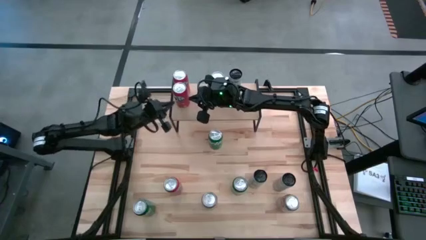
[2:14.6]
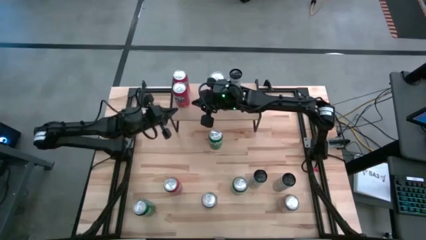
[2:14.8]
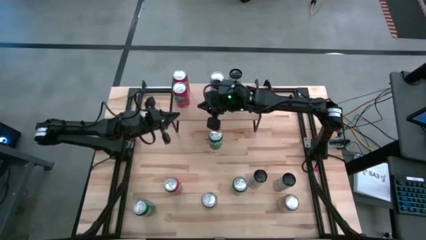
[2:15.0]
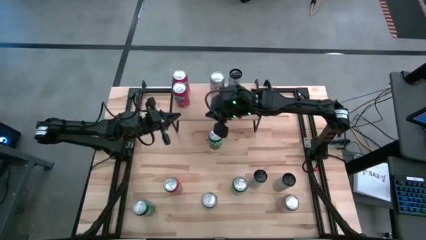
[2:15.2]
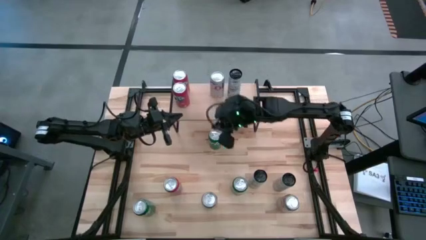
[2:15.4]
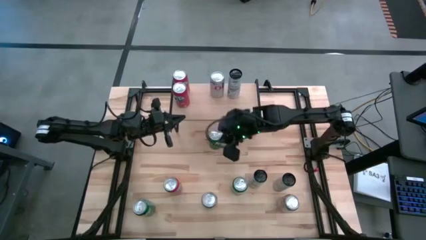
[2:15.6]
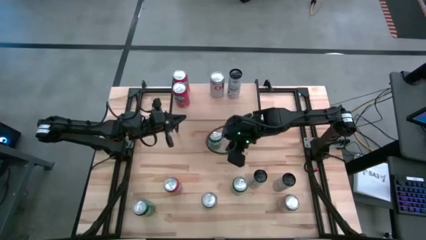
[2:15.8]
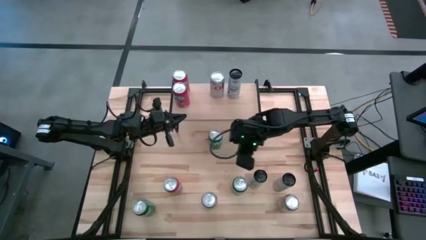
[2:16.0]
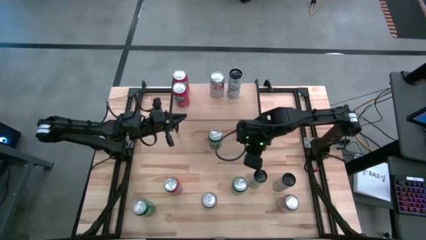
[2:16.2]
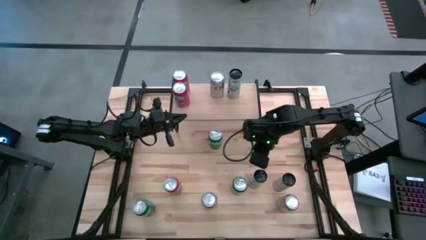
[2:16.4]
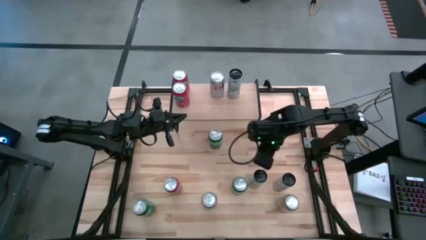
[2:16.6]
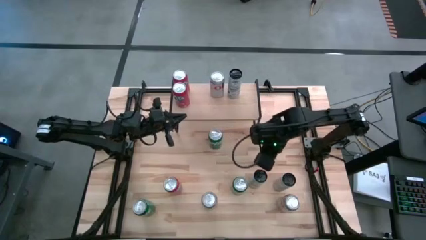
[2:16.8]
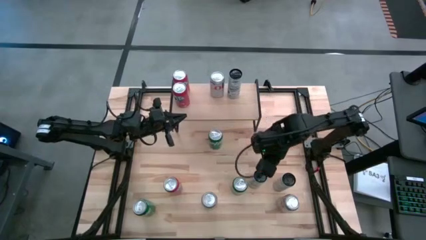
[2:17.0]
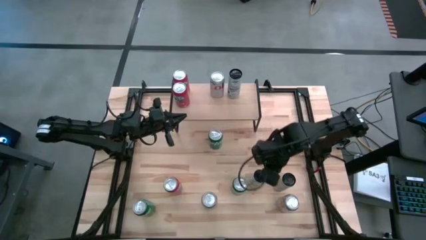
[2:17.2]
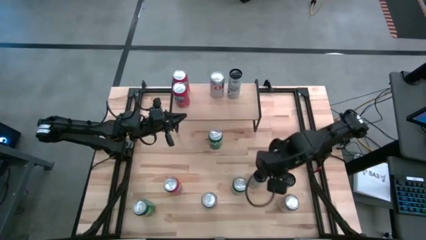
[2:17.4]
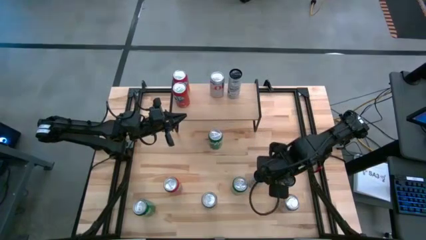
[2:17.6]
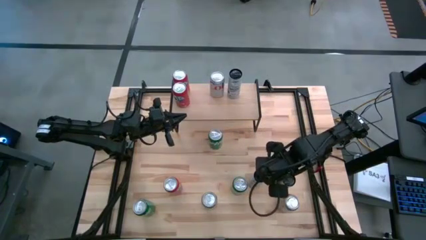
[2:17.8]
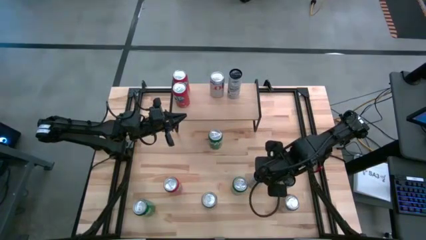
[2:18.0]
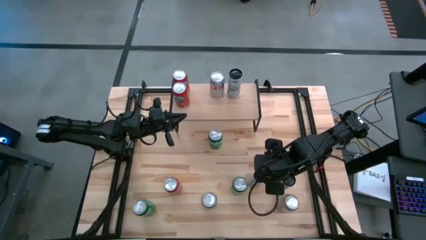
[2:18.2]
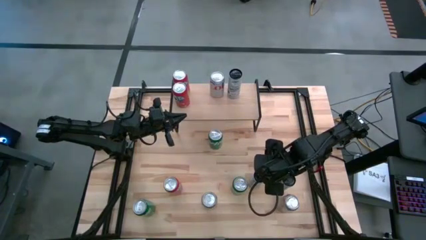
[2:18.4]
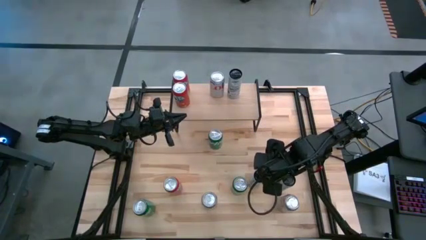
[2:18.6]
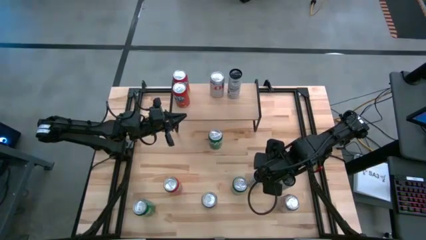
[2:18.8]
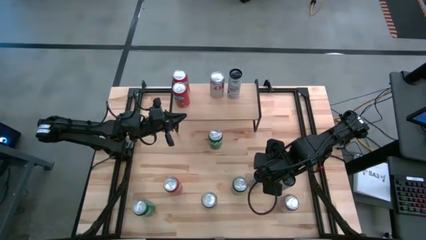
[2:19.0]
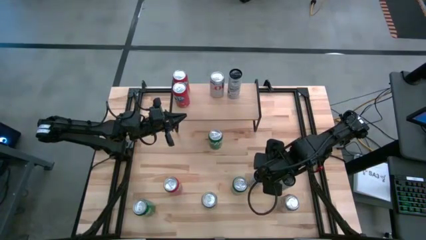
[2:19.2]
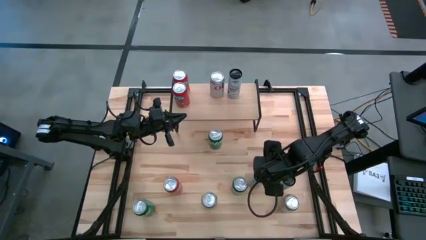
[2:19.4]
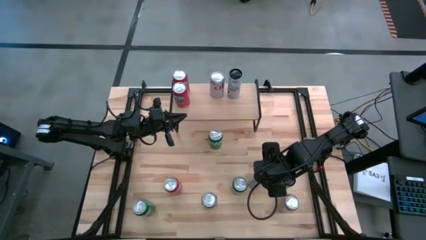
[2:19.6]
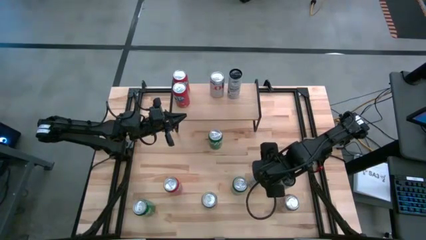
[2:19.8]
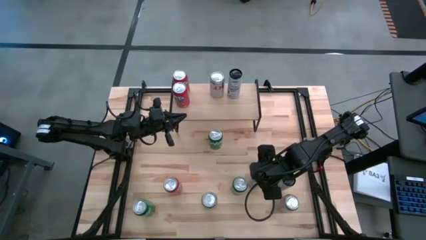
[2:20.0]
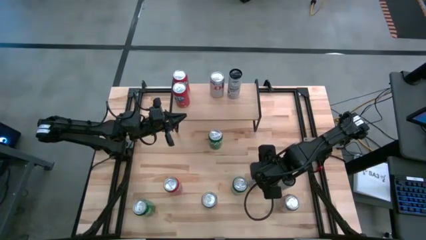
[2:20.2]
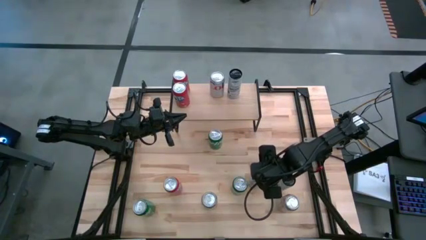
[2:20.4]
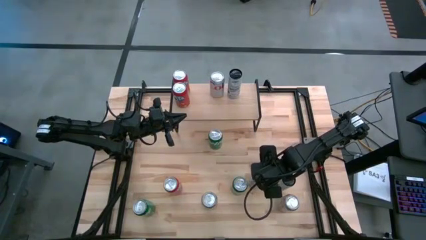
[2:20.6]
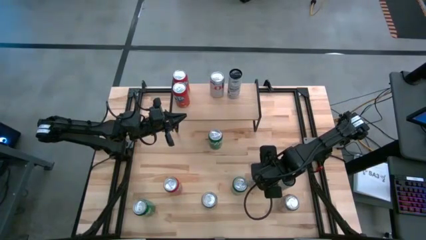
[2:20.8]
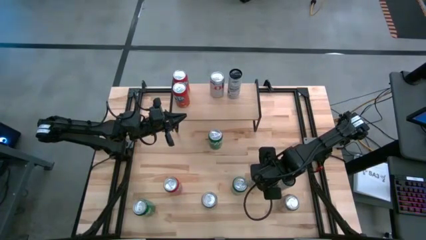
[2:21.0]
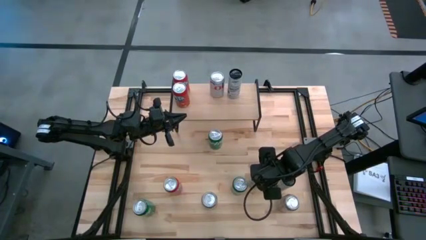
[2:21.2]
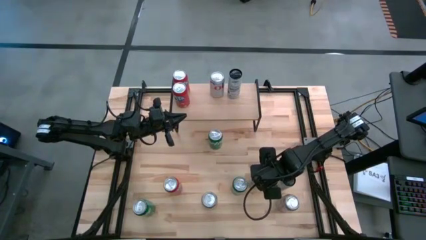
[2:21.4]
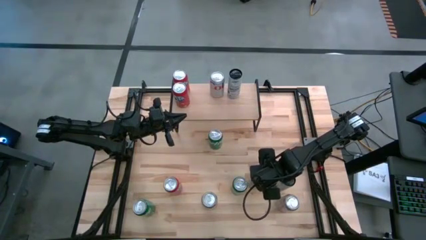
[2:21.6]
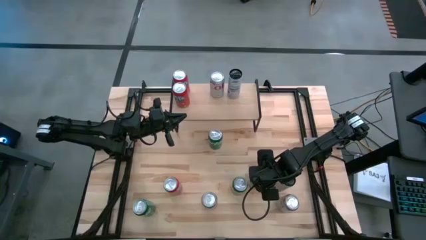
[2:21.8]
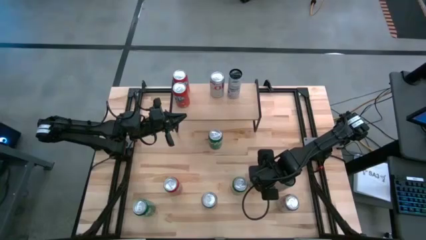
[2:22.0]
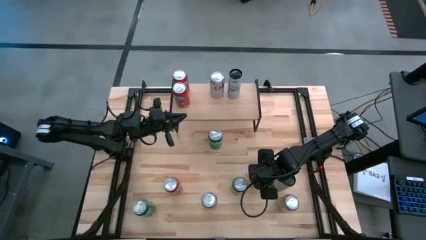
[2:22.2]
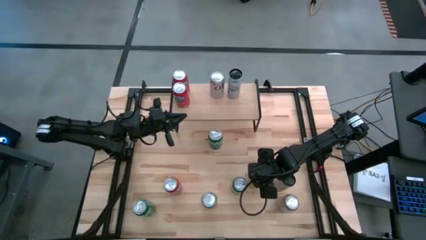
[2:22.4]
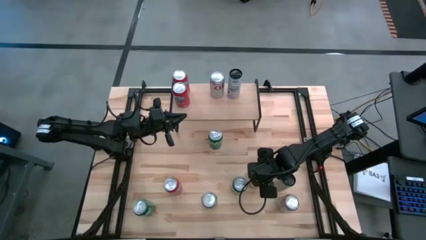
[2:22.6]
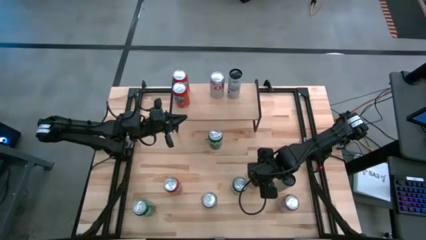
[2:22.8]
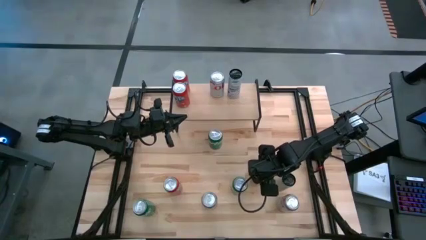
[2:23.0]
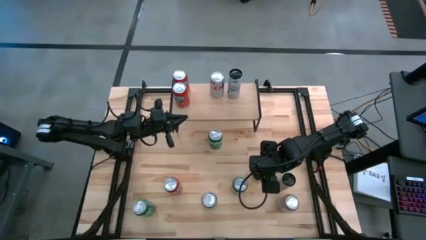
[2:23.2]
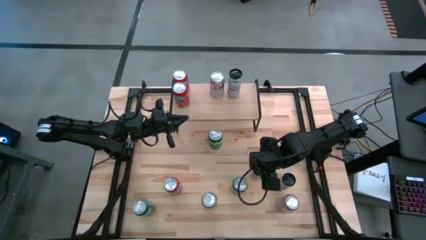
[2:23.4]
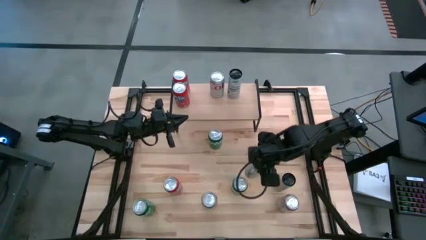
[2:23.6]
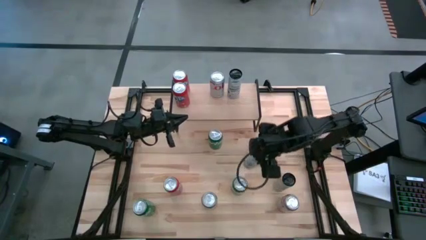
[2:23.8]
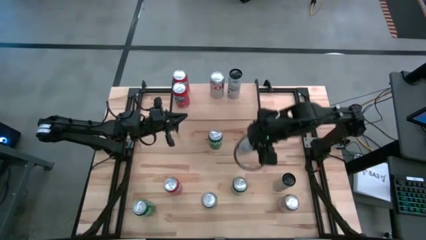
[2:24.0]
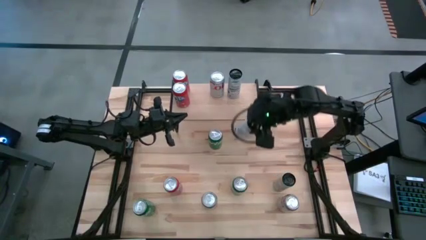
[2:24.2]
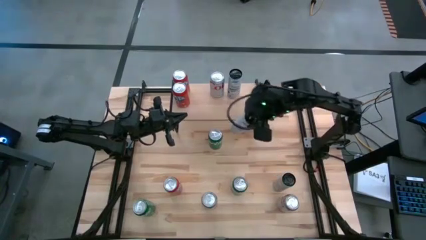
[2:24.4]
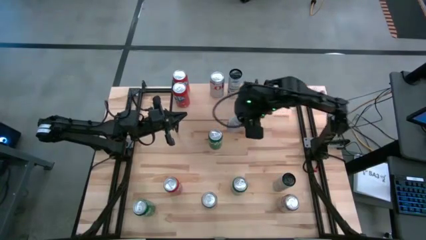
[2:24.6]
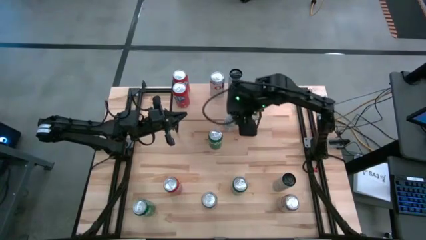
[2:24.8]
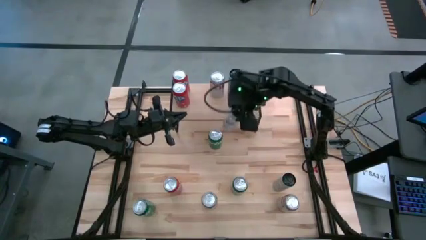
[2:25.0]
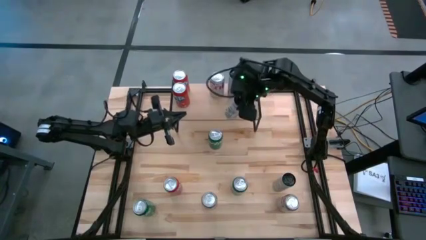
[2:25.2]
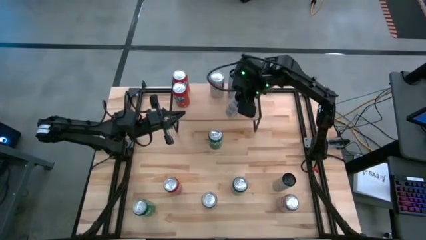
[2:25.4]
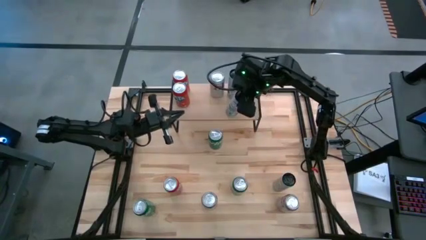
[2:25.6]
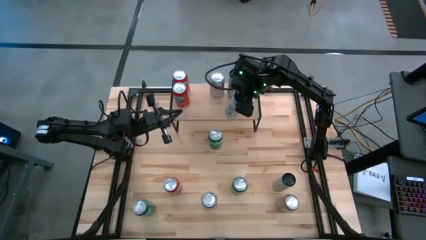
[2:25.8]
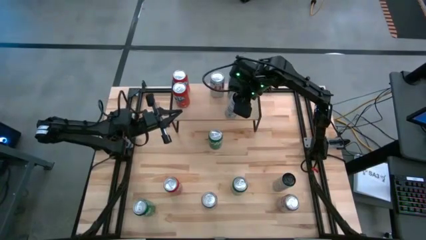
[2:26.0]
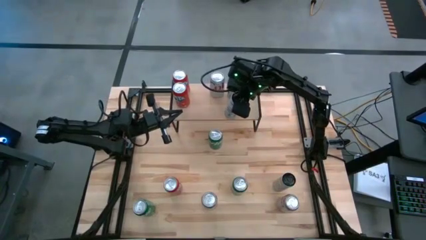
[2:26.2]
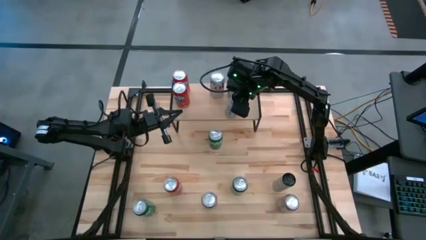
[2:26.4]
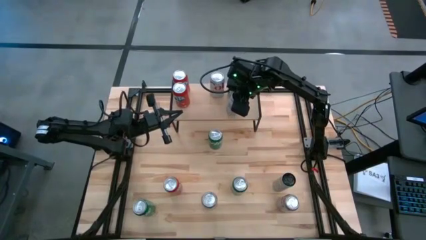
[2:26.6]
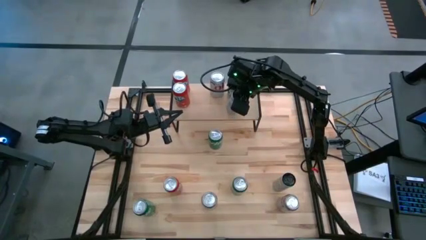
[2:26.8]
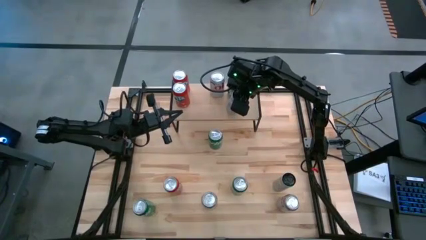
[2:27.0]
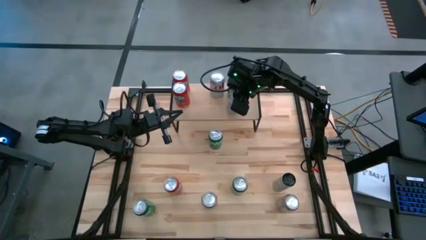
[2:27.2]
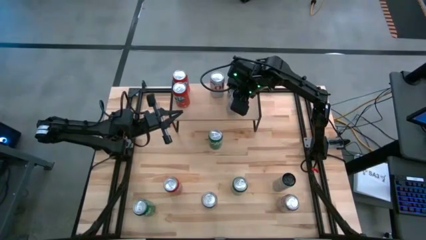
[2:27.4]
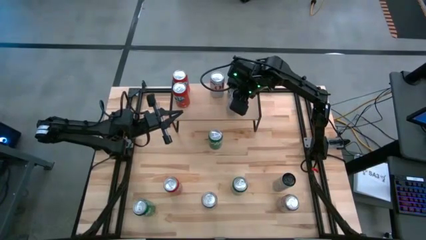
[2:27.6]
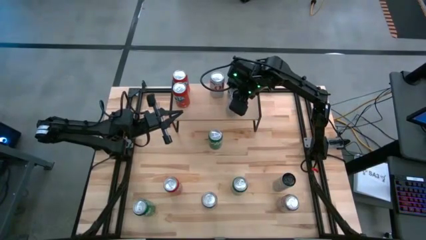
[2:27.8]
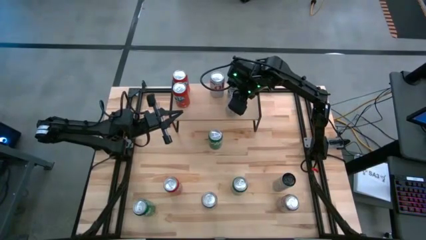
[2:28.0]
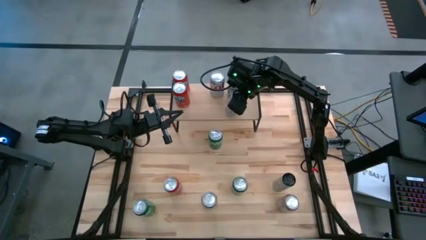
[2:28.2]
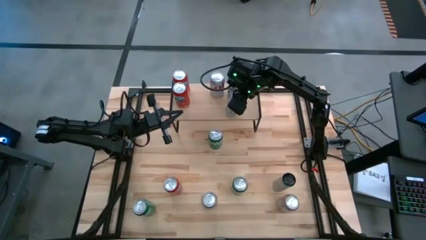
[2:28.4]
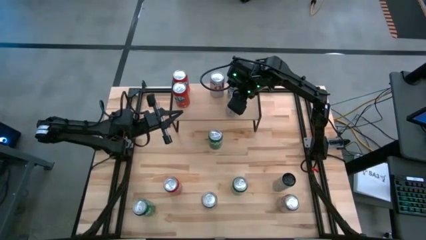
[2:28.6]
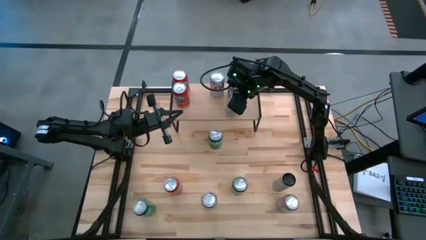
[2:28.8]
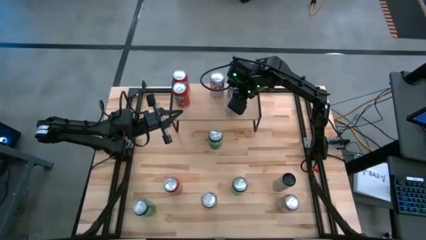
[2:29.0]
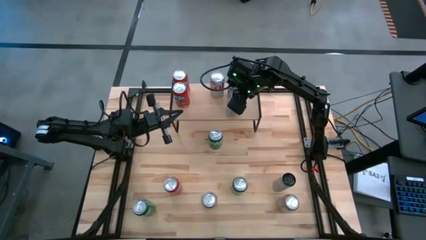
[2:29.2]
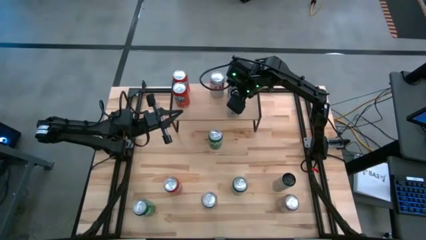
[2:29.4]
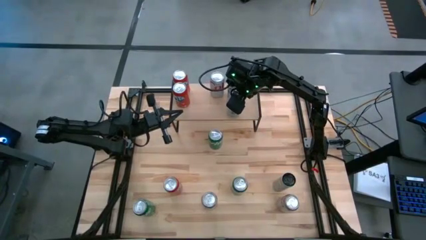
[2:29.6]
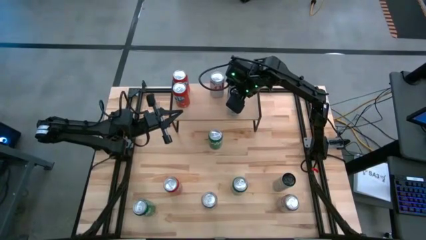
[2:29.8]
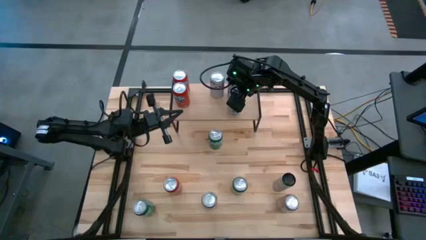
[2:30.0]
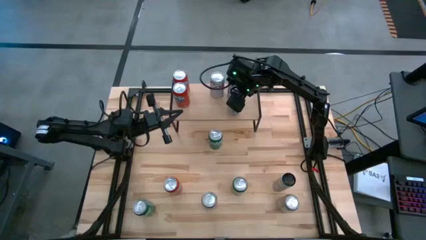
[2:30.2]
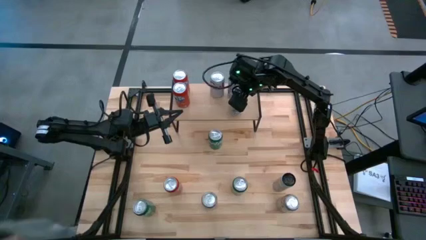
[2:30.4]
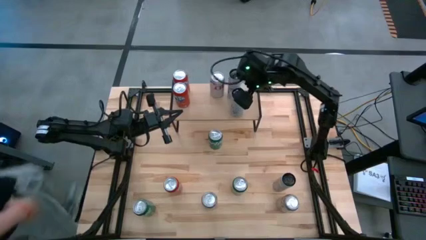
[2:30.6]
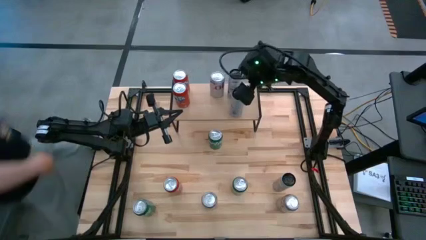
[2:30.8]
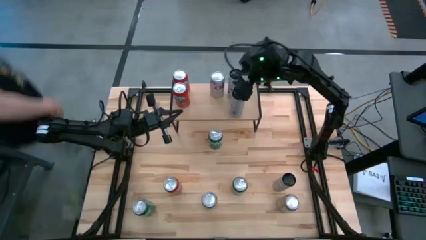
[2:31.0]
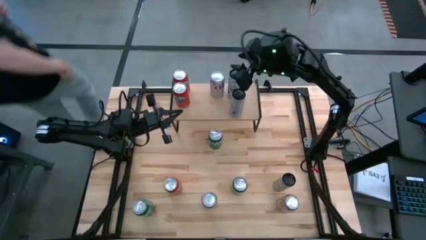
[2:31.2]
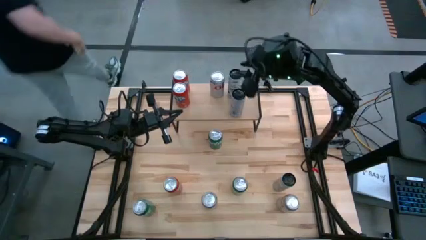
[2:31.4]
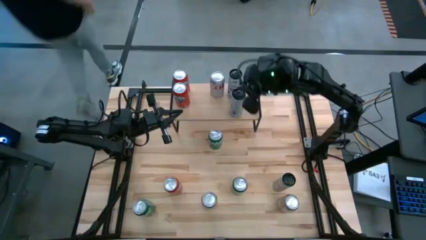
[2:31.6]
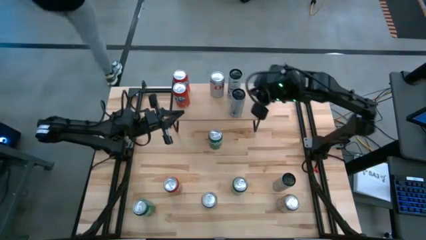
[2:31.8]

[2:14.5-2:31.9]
Task: Place canned beverage on shelf
Put the left white-blue soda can on the shelf aligned with the other white-blue soda can
